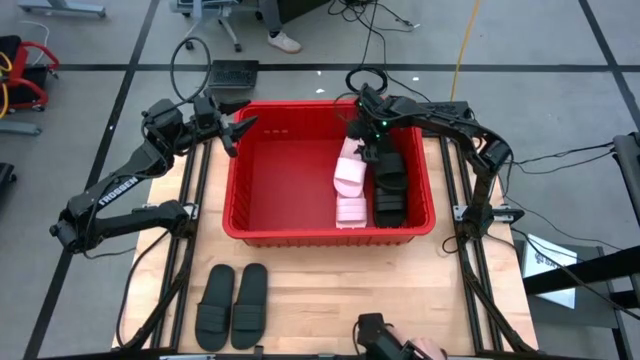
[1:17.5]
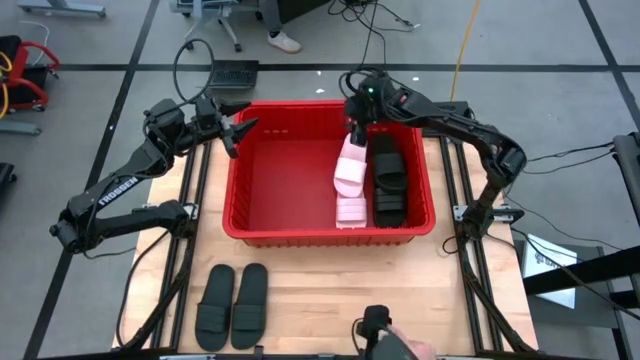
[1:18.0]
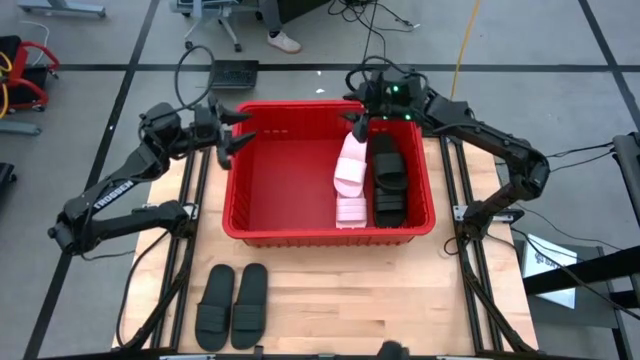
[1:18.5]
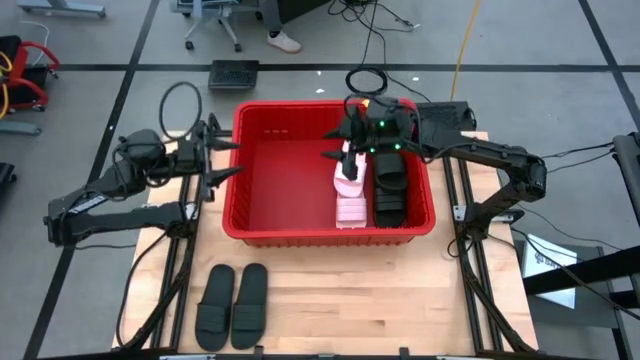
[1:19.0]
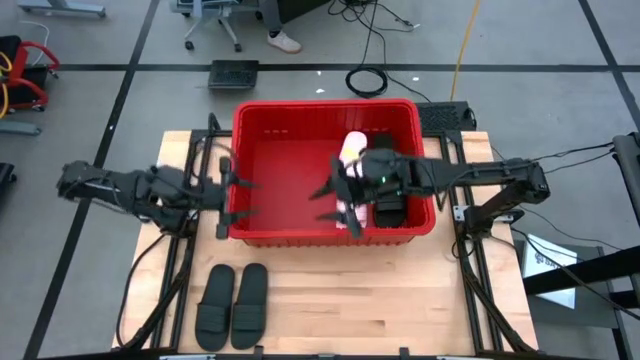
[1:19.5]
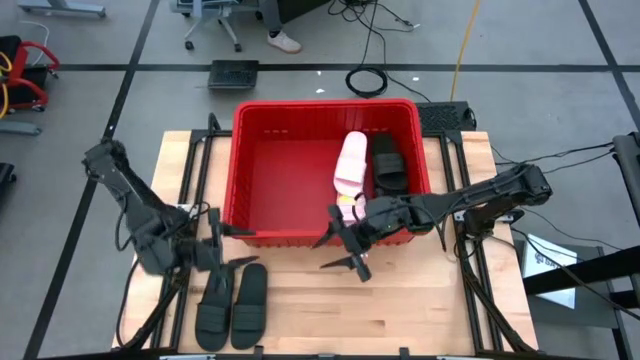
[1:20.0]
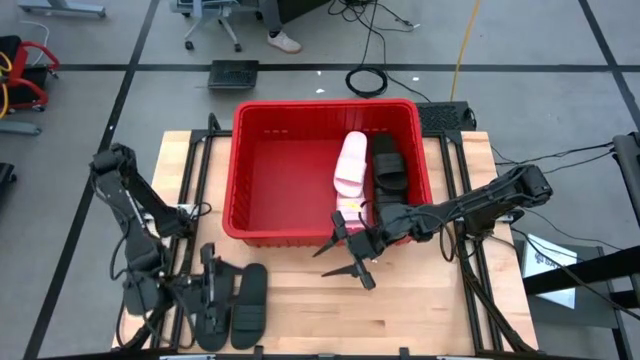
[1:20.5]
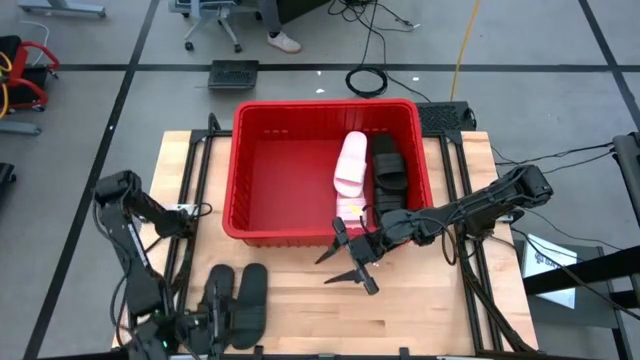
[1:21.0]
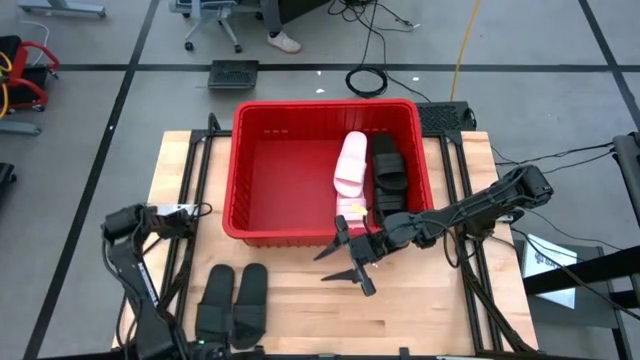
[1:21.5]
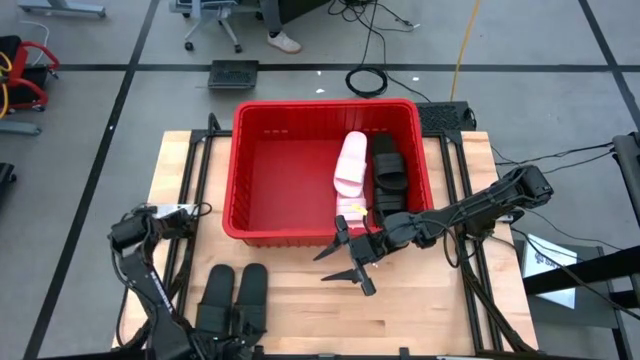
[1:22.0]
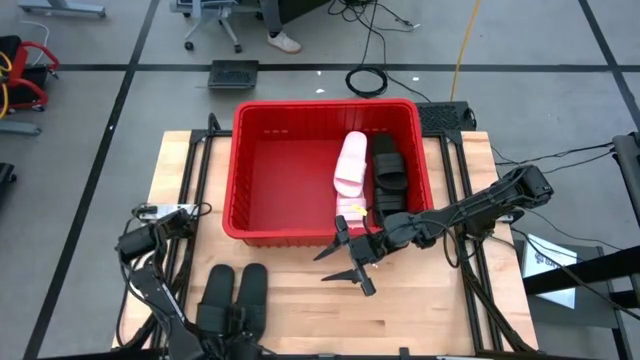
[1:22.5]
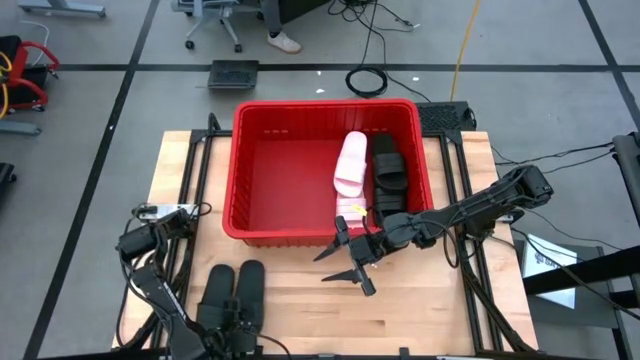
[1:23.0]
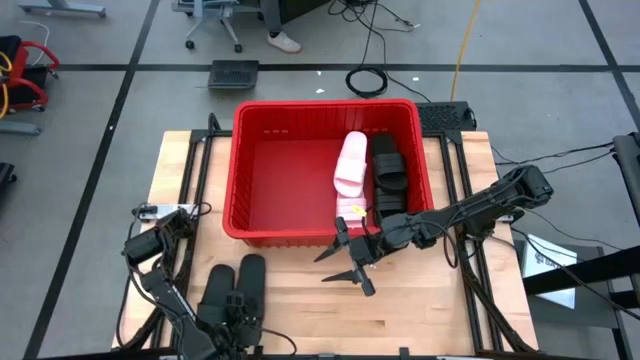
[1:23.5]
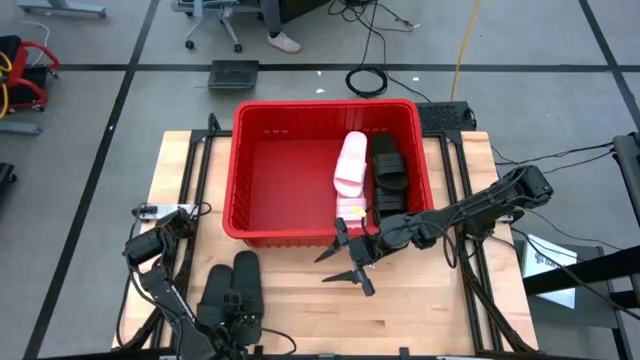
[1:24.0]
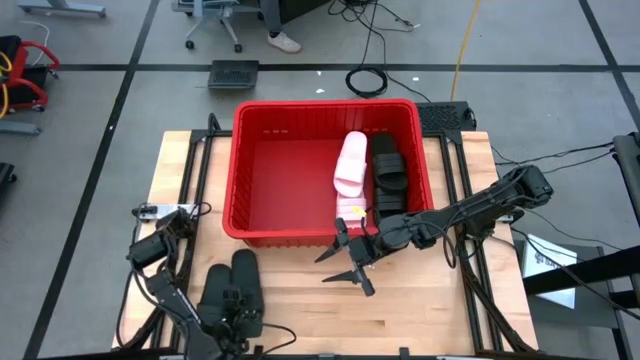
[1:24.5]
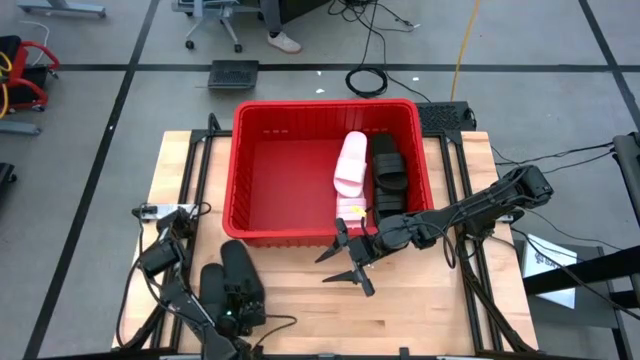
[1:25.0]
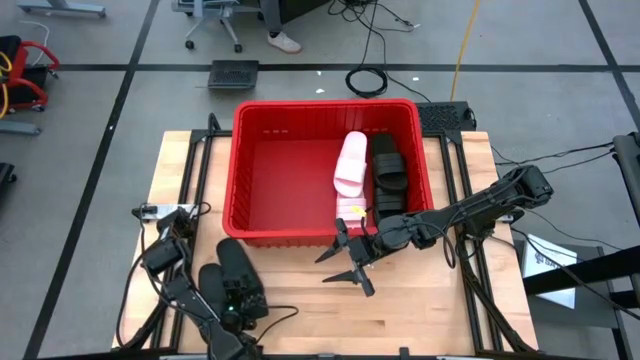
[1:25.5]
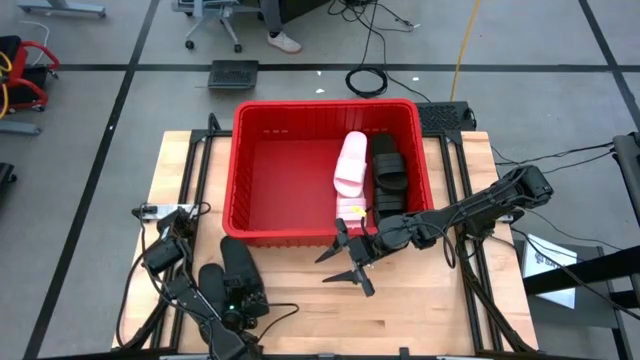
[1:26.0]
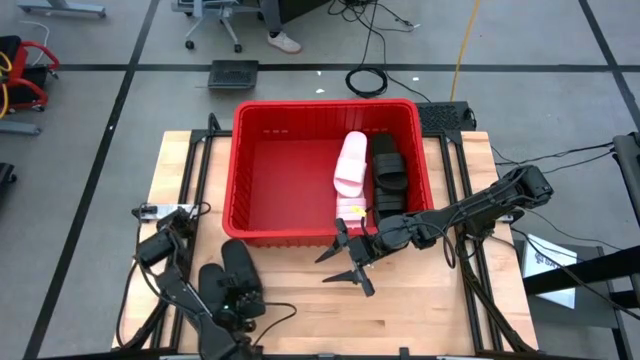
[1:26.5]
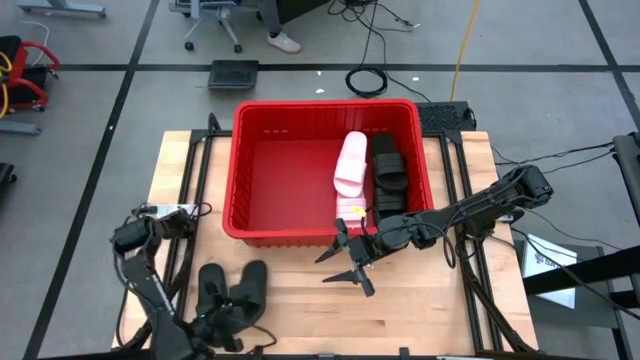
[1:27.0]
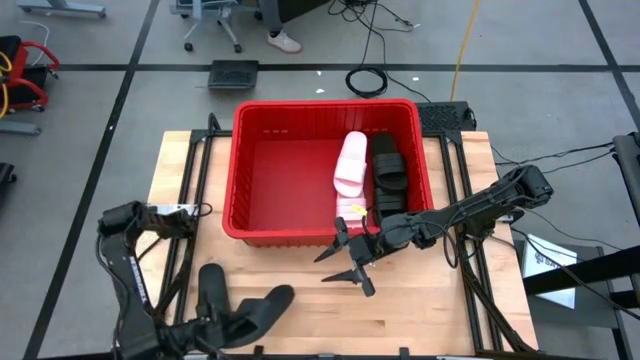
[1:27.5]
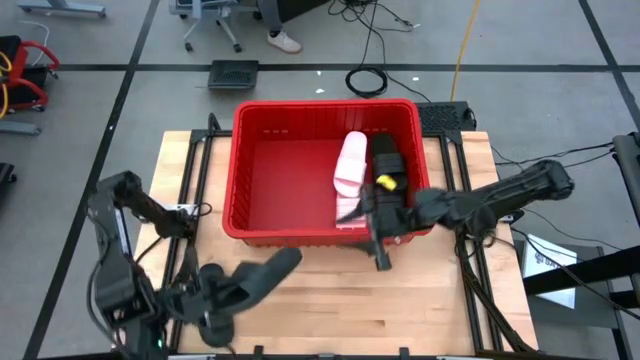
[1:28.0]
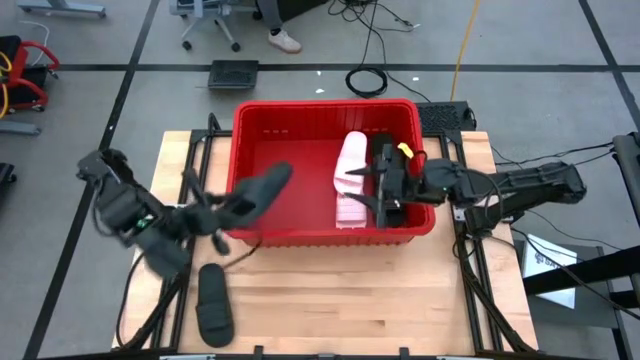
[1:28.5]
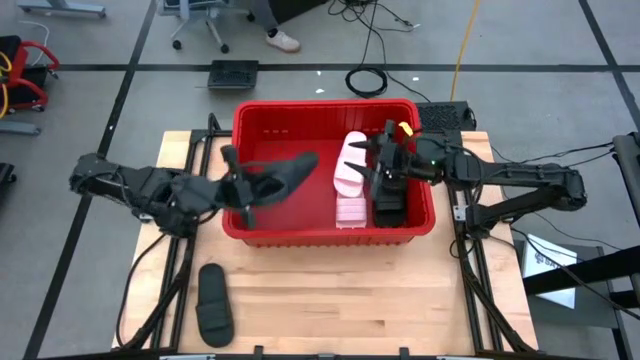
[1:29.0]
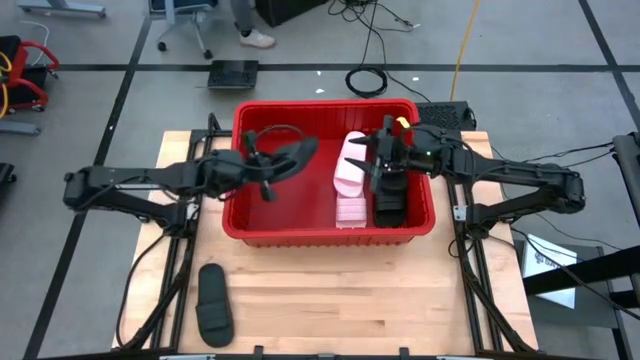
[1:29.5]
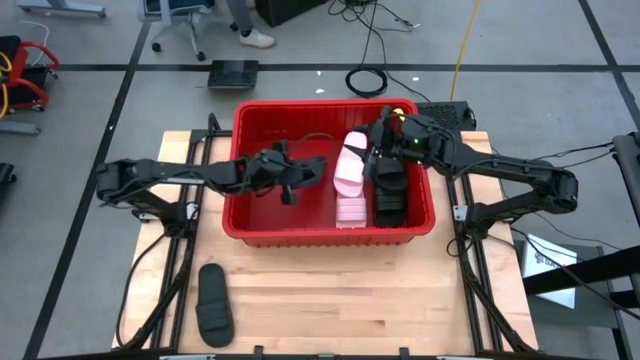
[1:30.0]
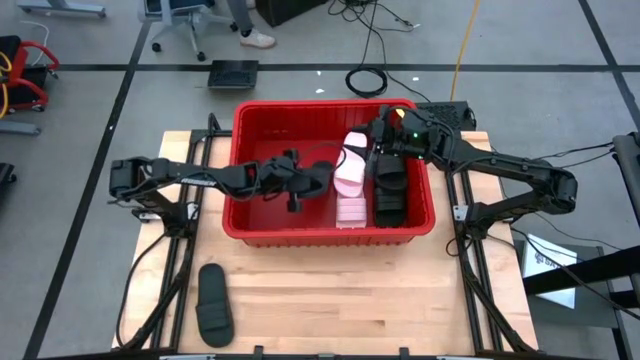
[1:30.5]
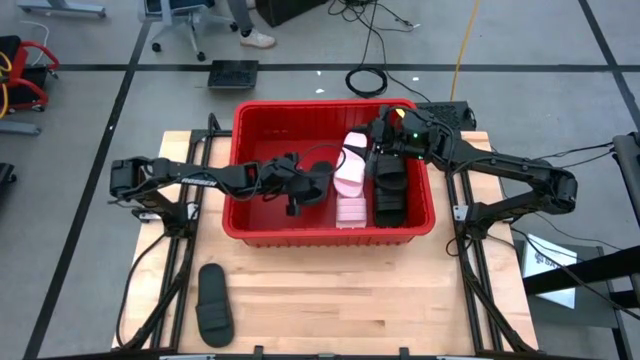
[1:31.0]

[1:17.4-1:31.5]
Task: Pick and place slides into bin
Put the black slide into the red container

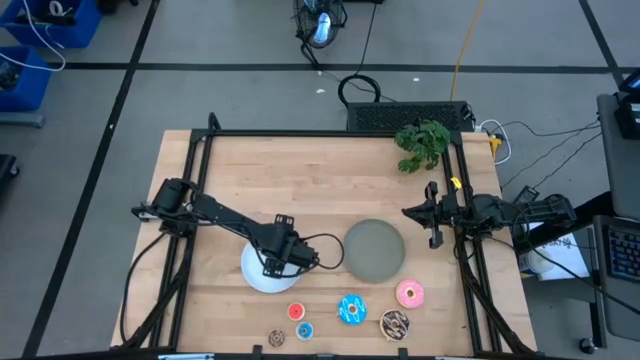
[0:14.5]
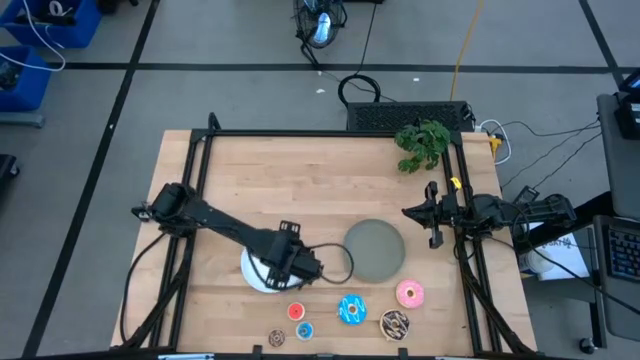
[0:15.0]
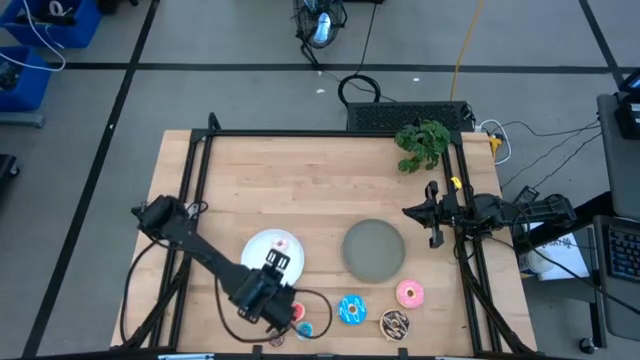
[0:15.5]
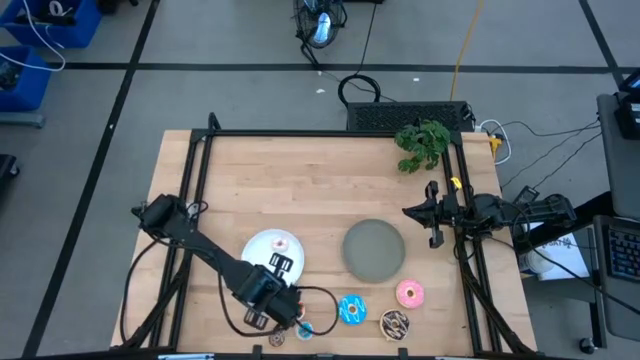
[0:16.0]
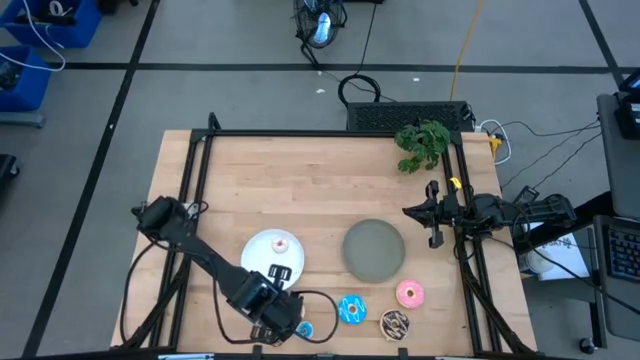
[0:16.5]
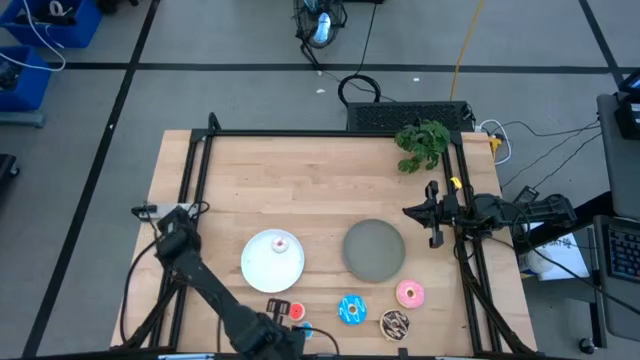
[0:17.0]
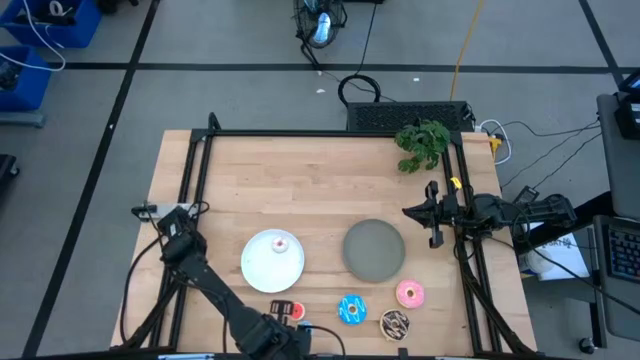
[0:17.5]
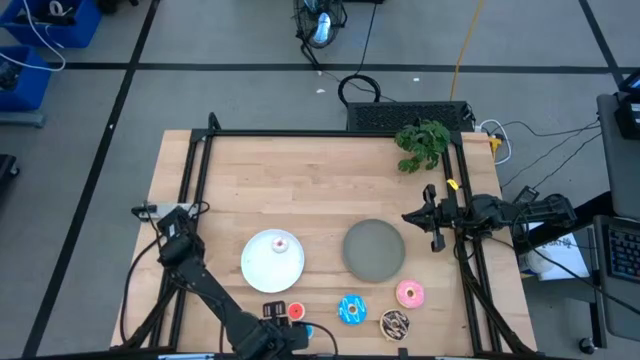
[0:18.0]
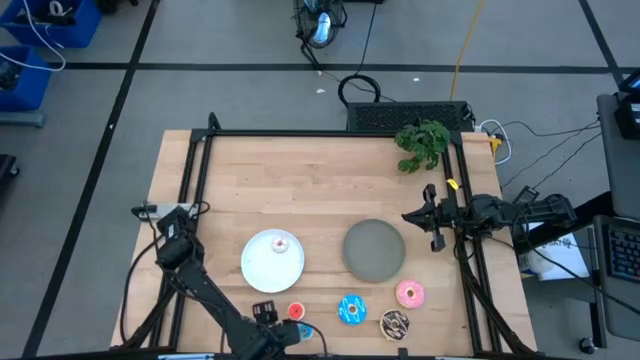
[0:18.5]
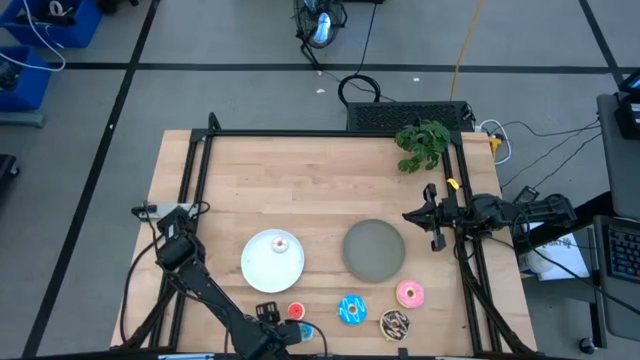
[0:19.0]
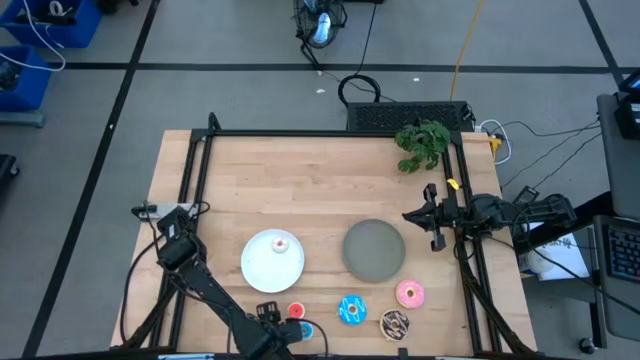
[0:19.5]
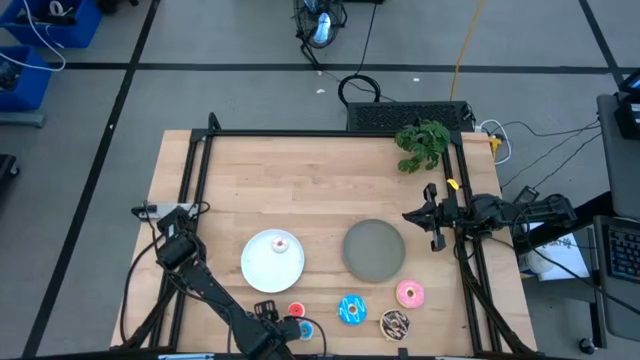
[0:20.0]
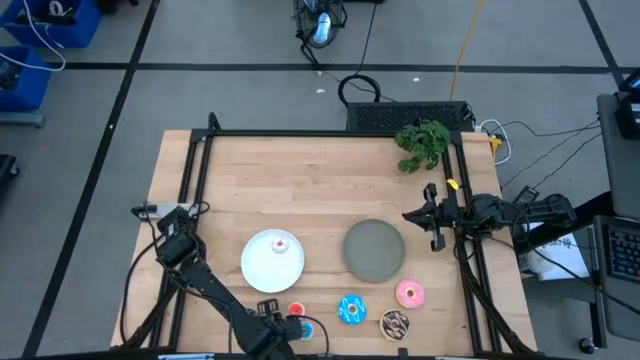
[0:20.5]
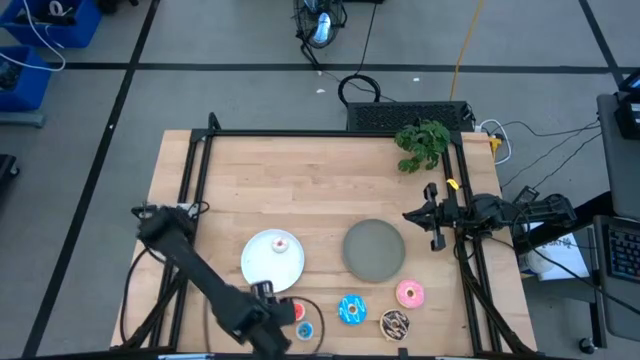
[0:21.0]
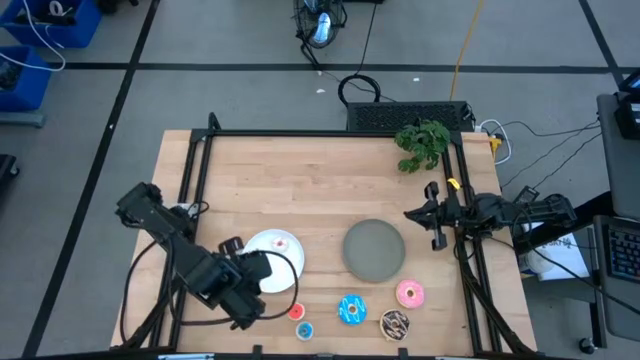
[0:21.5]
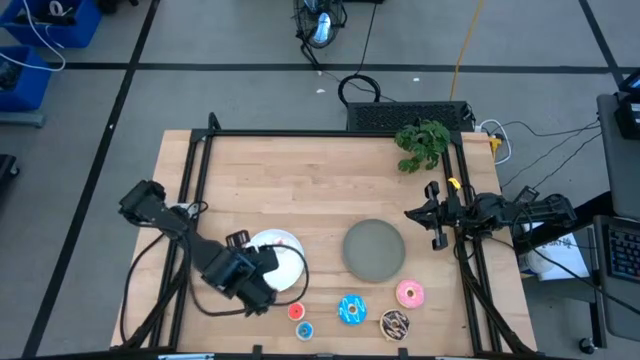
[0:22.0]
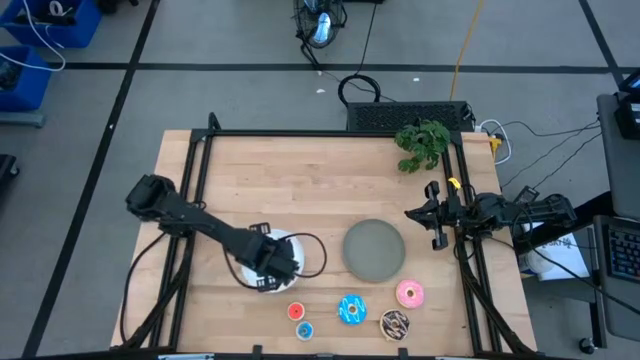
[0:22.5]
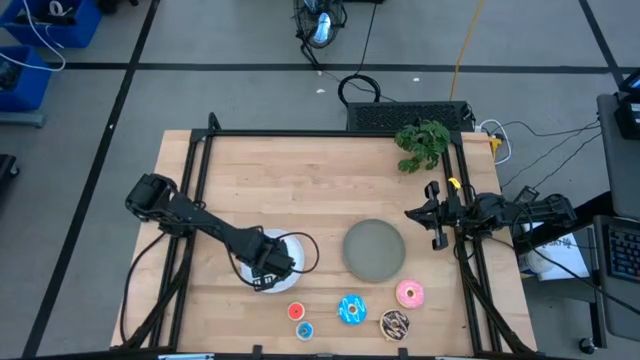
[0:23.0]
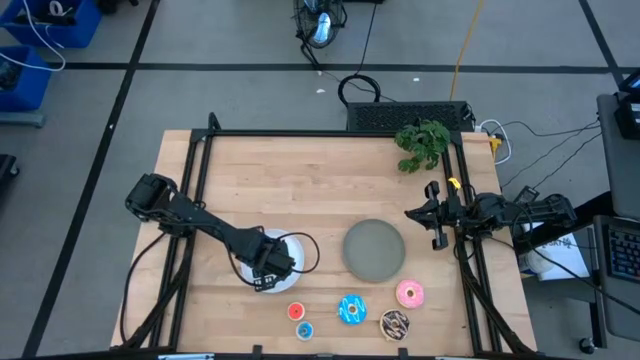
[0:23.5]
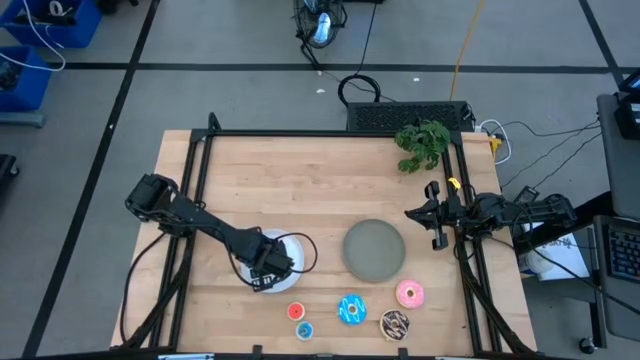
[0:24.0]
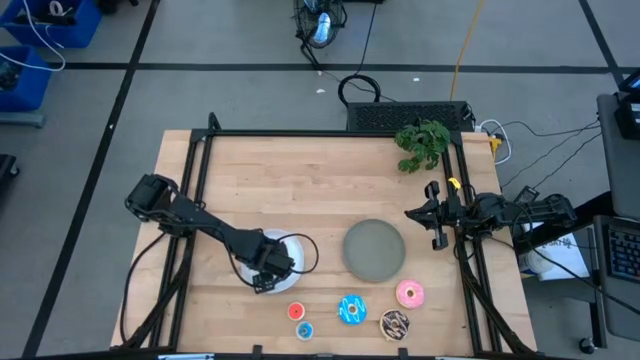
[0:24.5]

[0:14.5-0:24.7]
Task: Pick & Place donuts
Put the small brown donut on the white plate
